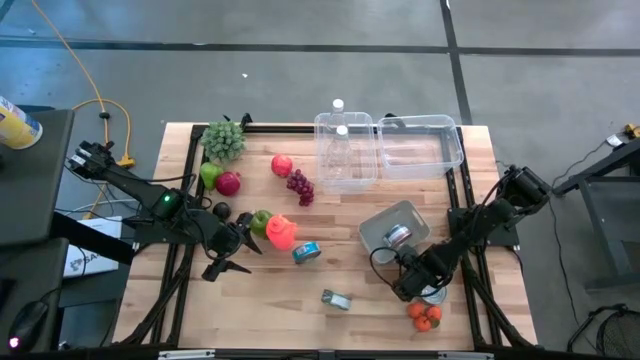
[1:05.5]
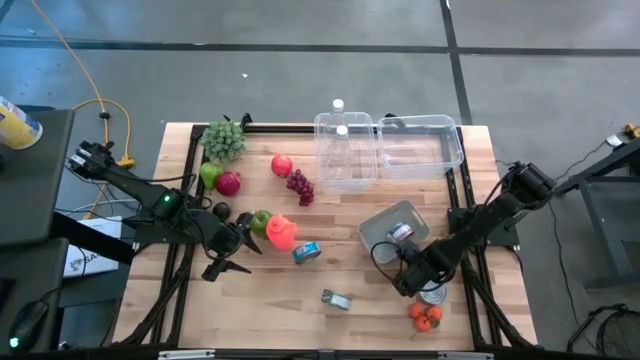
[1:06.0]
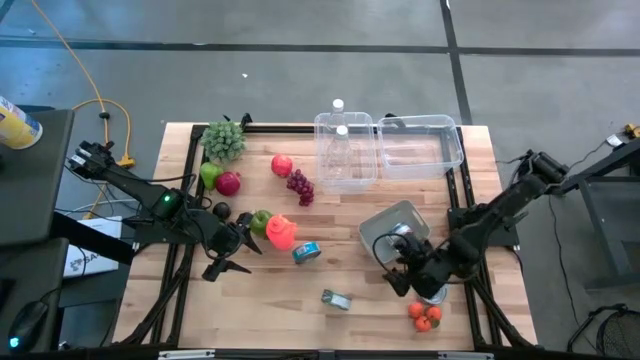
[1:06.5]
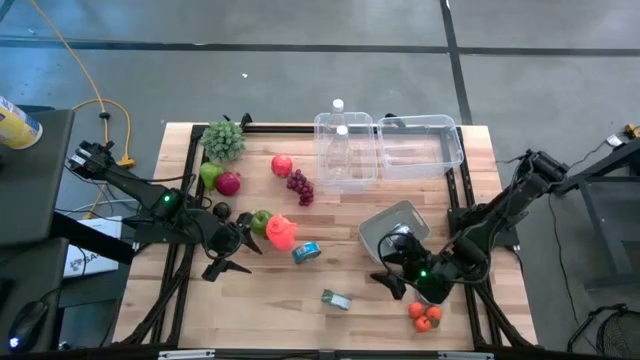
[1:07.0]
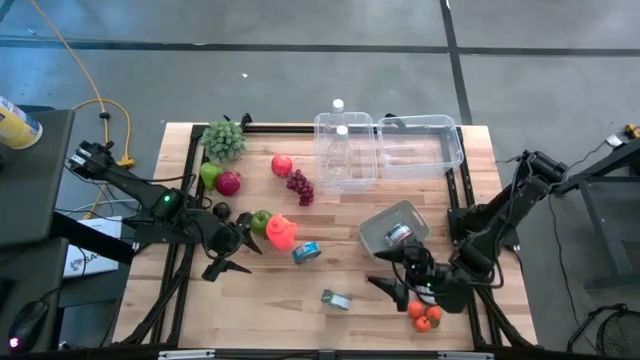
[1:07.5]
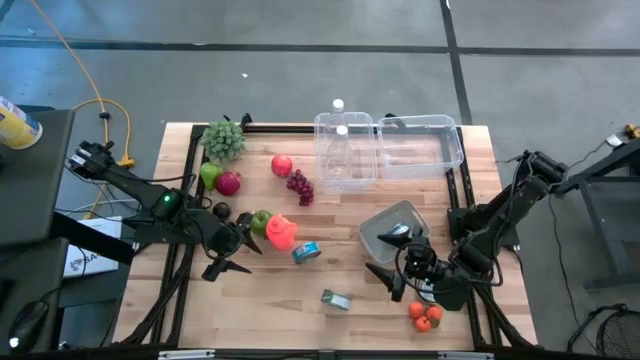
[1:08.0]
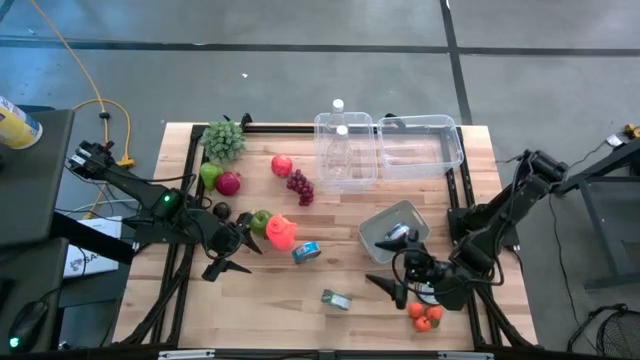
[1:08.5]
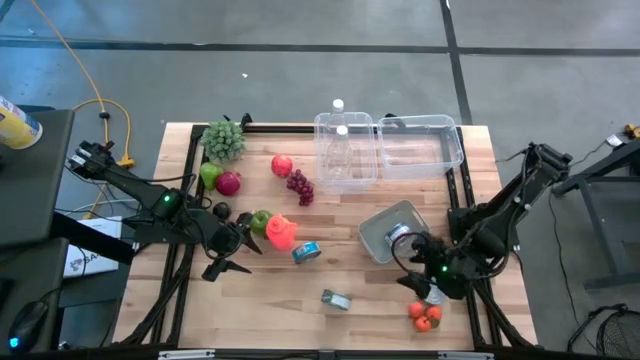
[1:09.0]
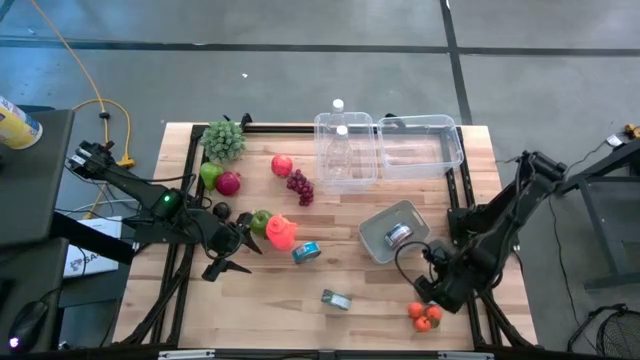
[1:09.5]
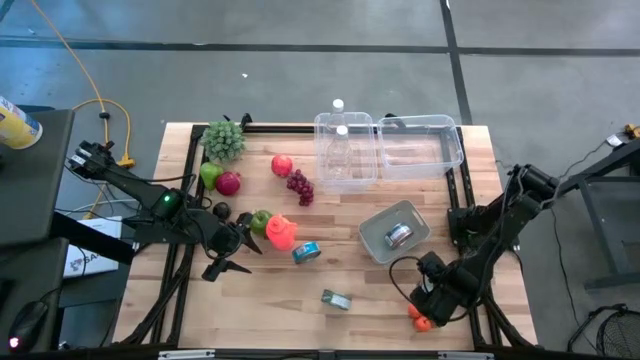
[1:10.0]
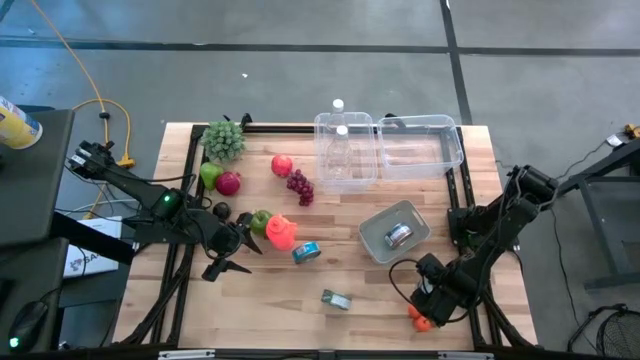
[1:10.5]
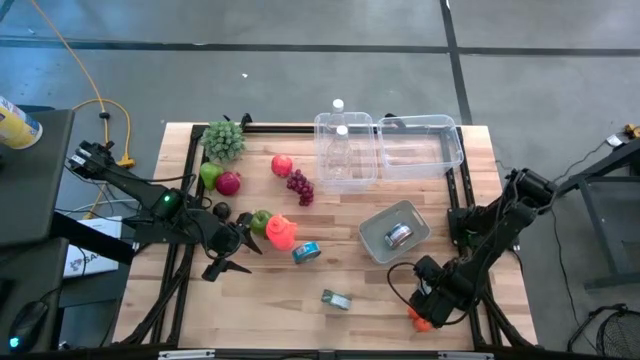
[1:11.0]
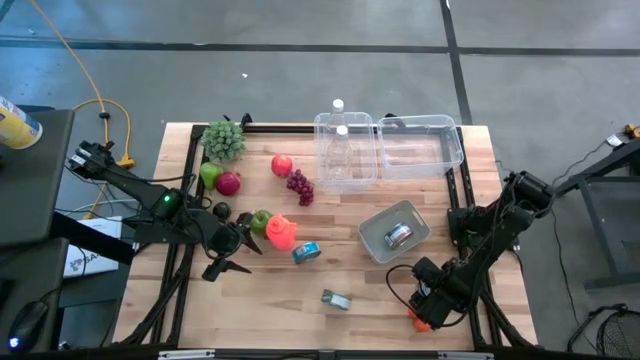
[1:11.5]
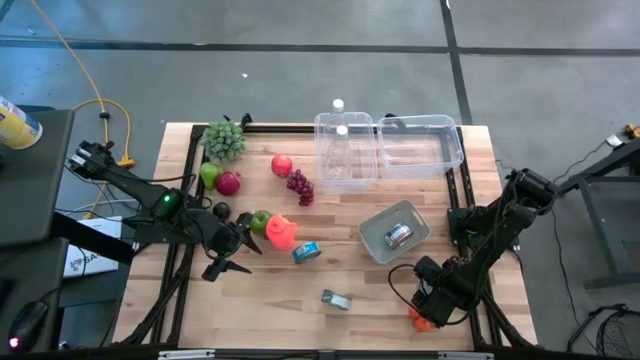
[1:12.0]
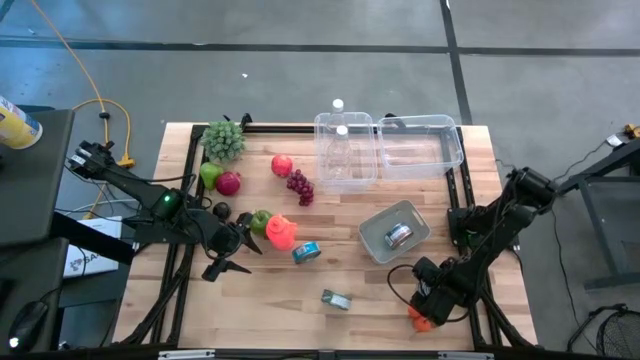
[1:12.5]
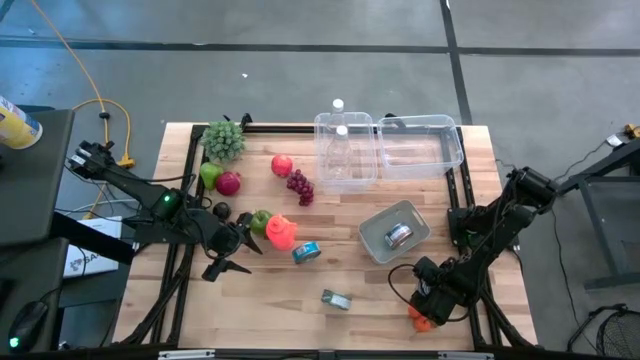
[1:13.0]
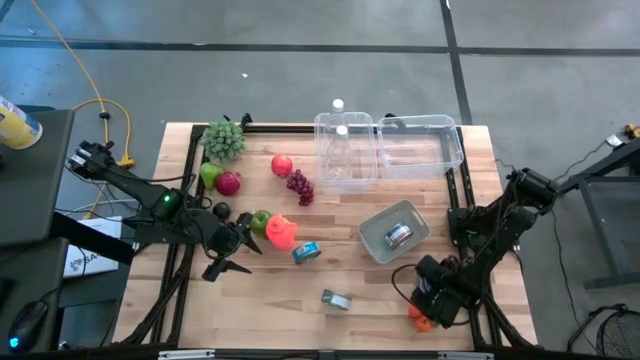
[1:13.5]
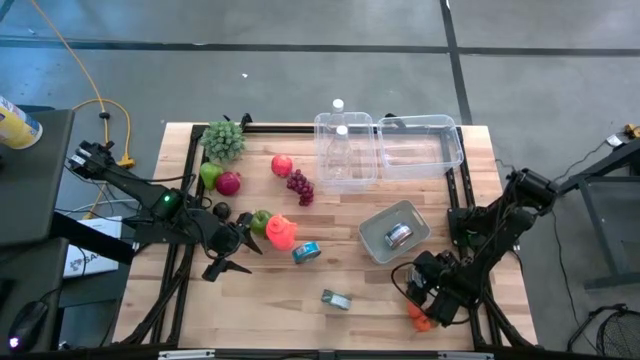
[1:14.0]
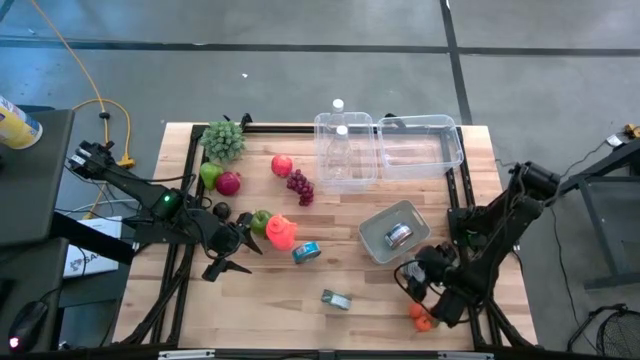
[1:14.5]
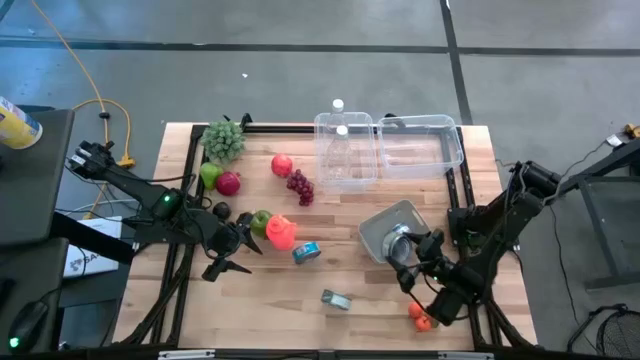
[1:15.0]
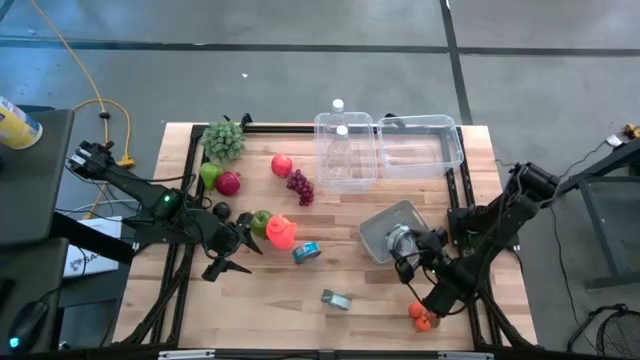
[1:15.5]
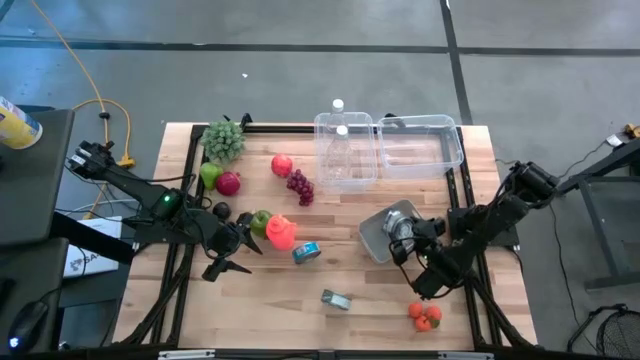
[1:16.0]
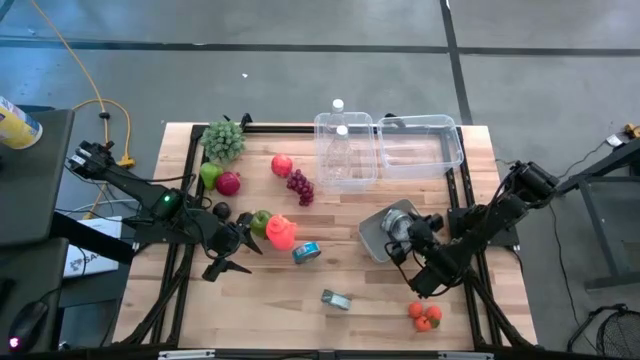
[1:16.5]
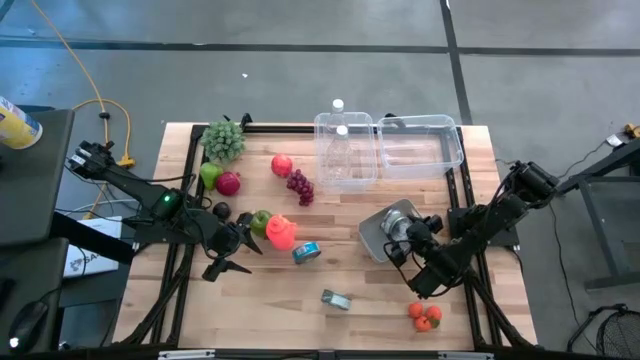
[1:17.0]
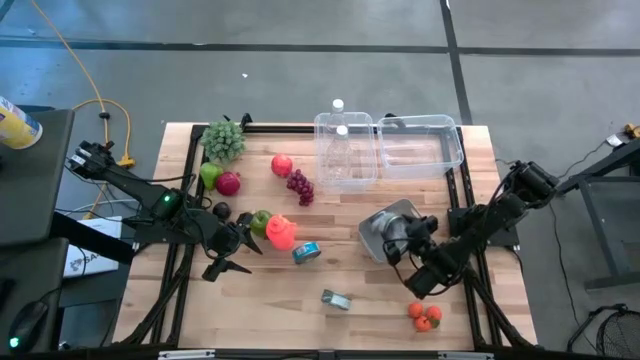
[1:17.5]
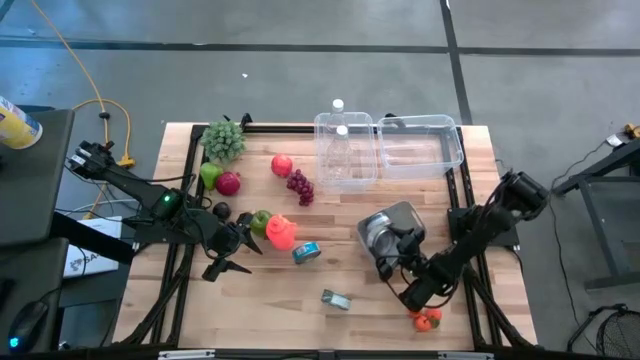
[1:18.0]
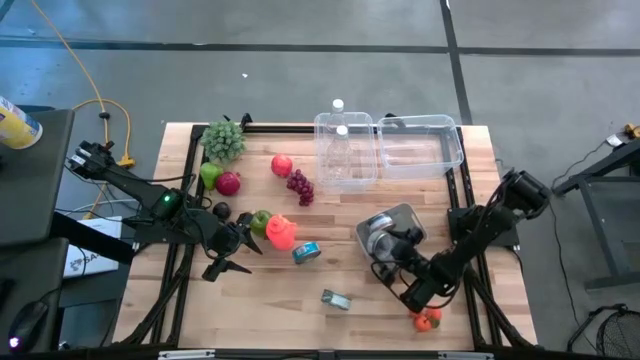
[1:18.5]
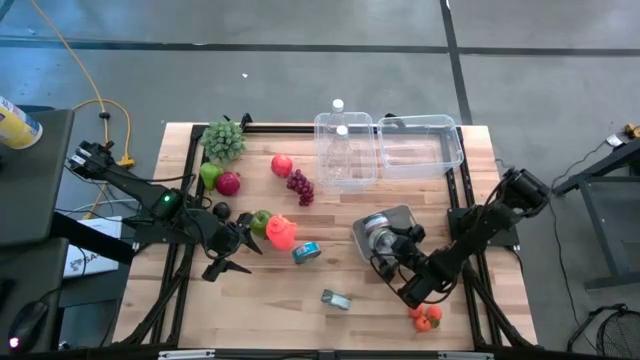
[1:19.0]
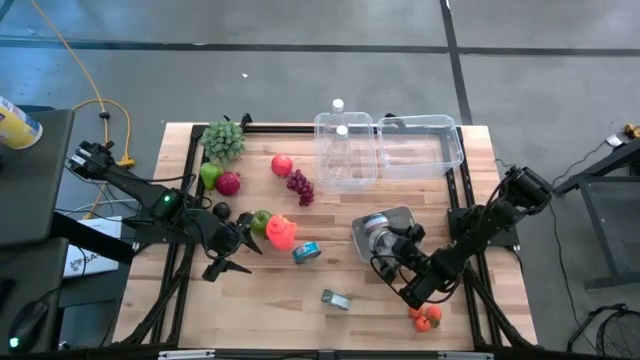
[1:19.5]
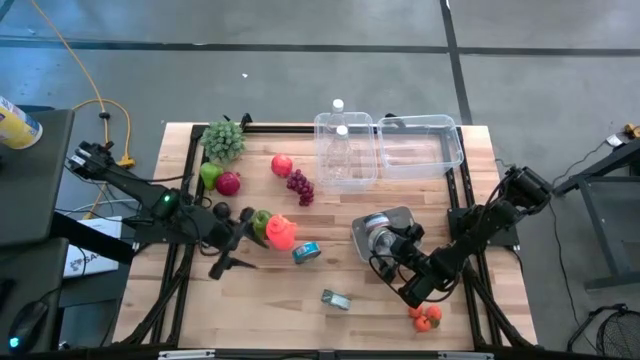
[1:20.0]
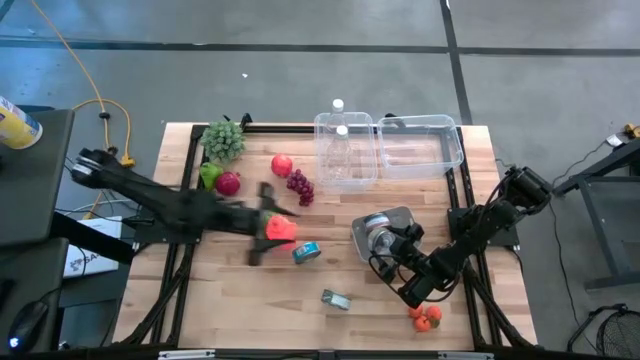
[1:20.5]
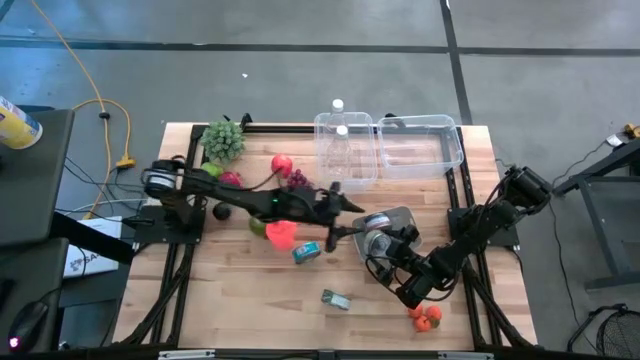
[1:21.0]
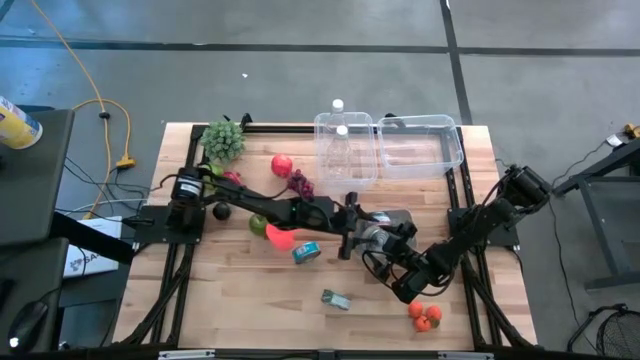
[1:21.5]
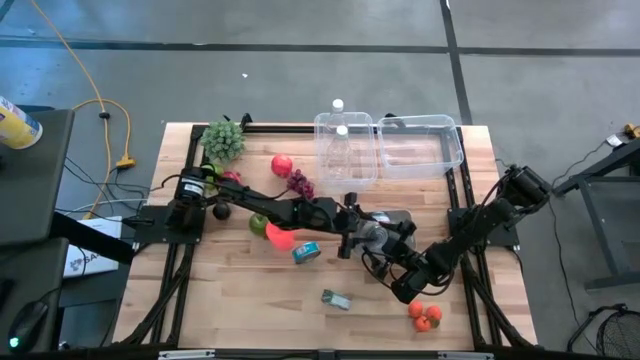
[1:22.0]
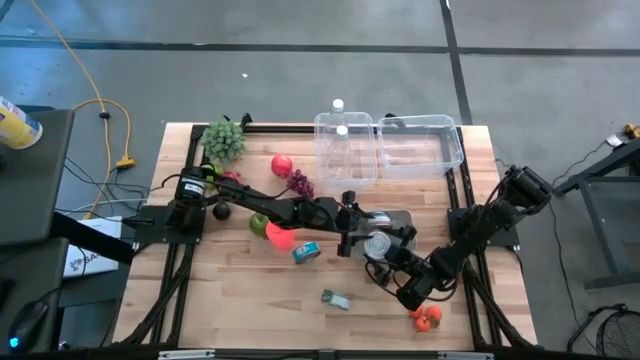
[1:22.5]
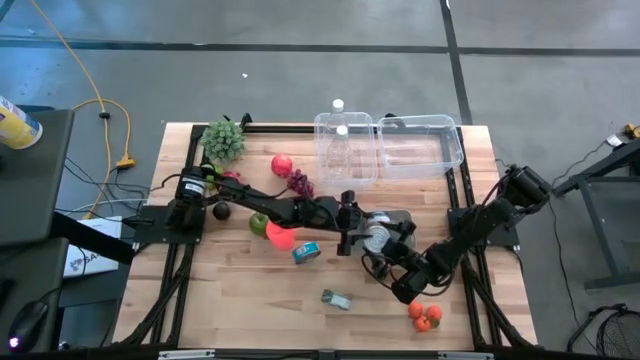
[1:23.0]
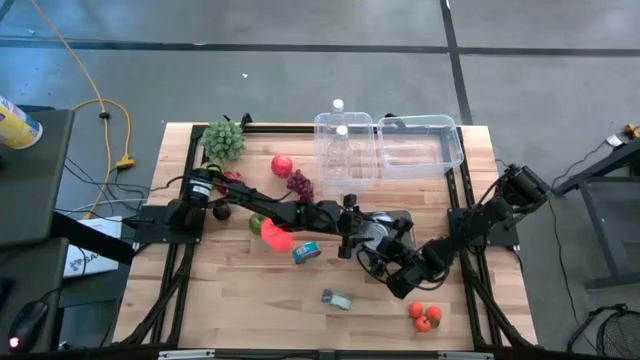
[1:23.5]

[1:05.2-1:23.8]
Task: Pick & Place Food Item
Put the right green tuna can into the gray bin

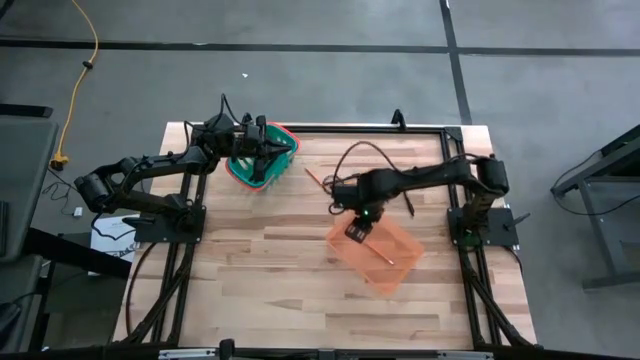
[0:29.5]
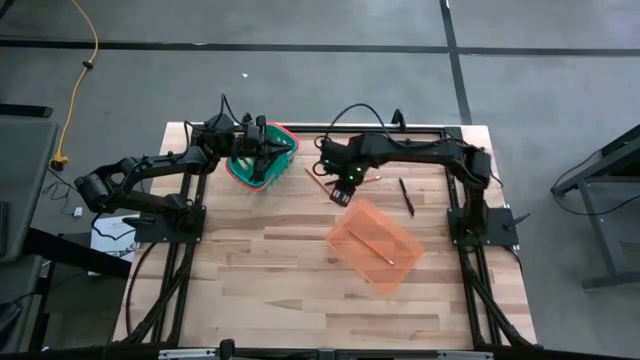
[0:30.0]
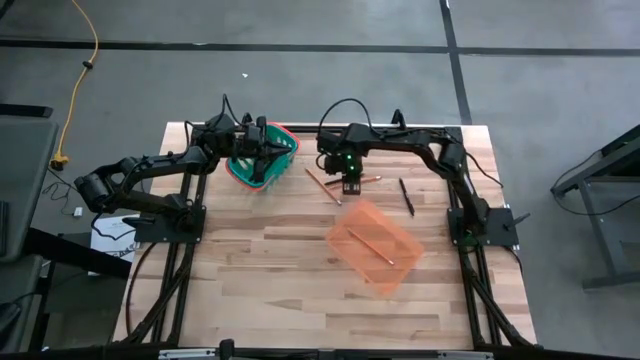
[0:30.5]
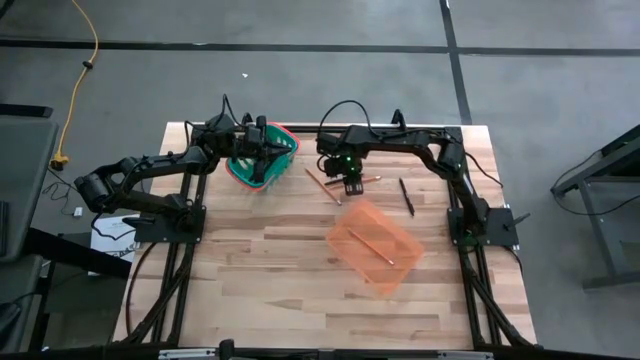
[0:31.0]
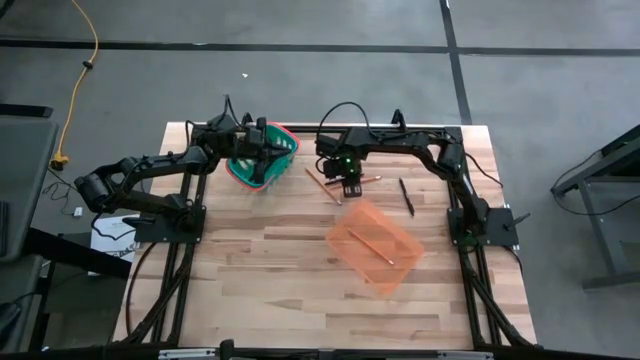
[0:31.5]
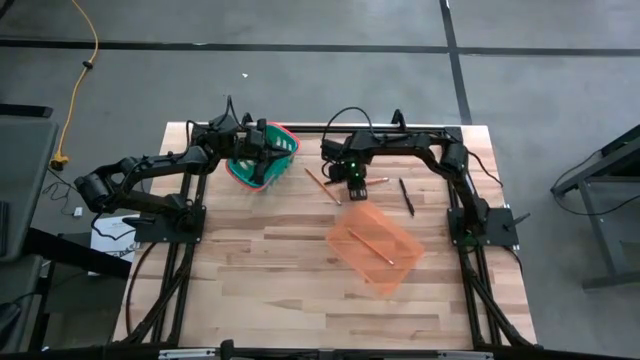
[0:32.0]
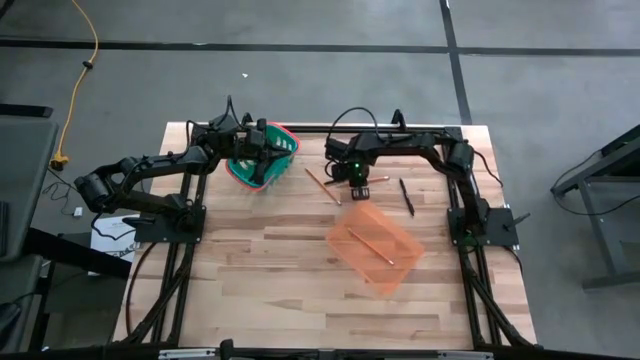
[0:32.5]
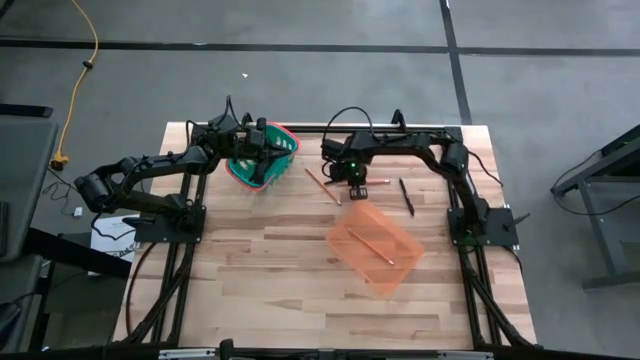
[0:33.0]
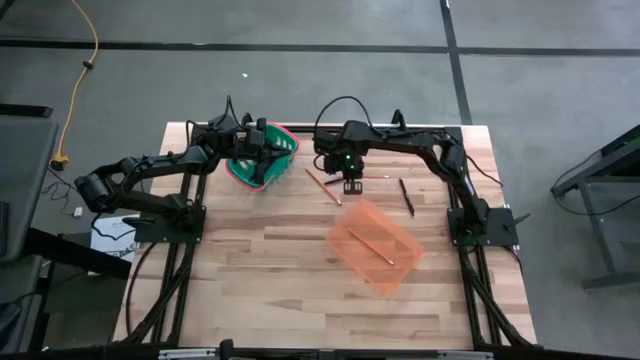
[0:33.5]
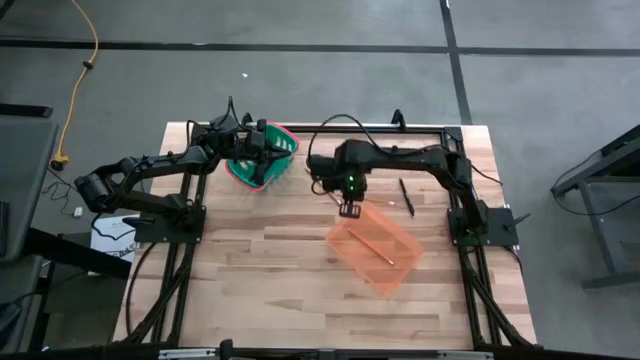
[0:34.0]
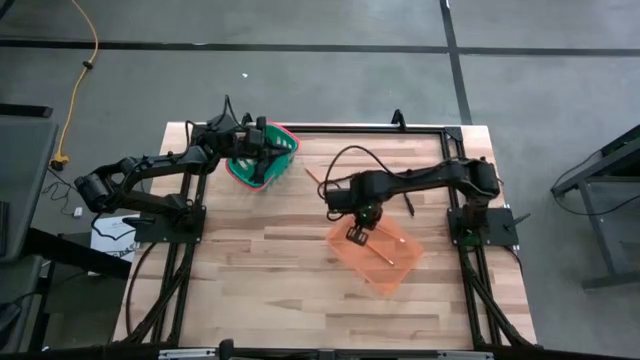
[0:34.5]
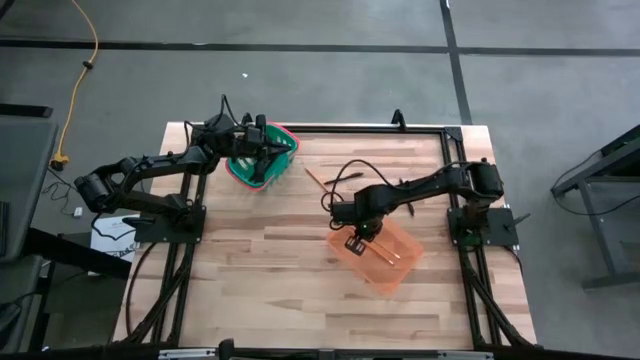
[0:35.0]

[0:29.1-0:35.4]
Task: Sort pens & pencils
Put the orange pencil into the orange bin
